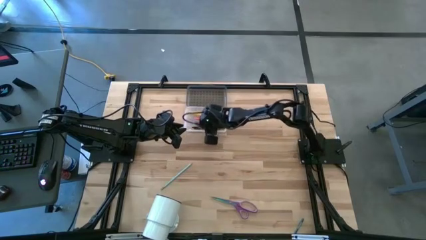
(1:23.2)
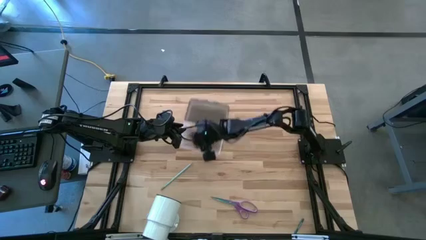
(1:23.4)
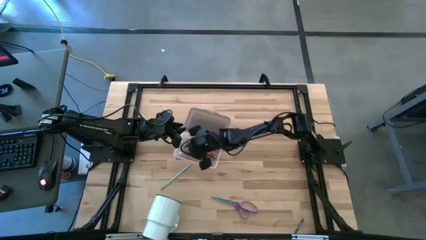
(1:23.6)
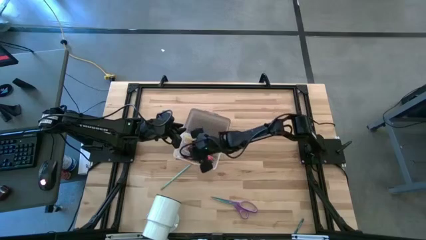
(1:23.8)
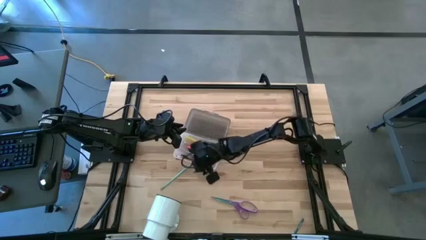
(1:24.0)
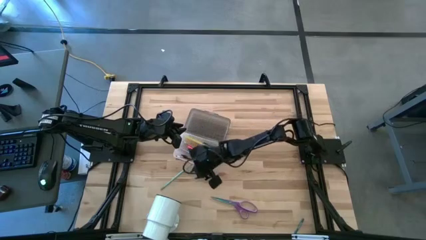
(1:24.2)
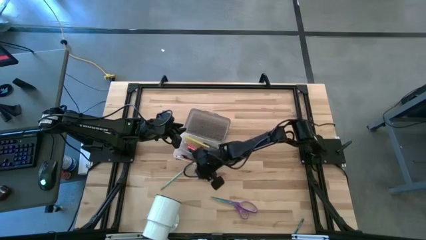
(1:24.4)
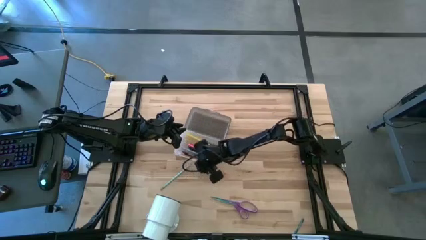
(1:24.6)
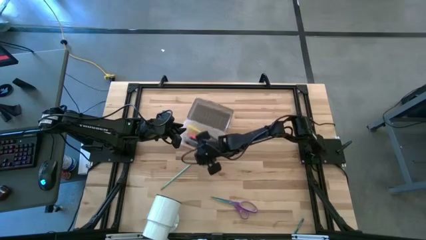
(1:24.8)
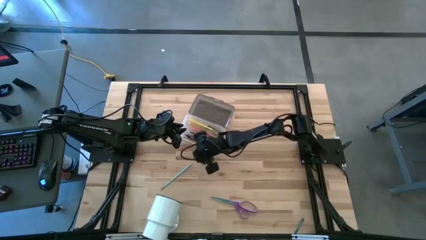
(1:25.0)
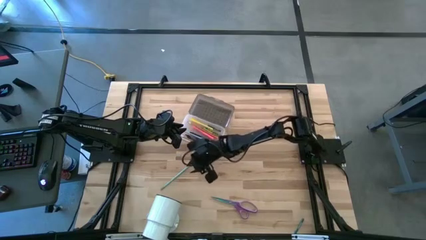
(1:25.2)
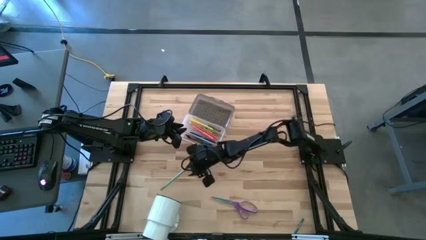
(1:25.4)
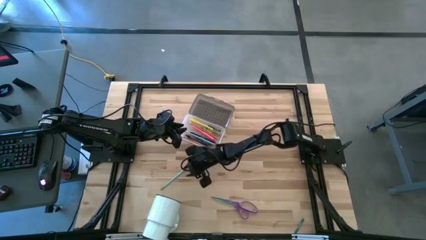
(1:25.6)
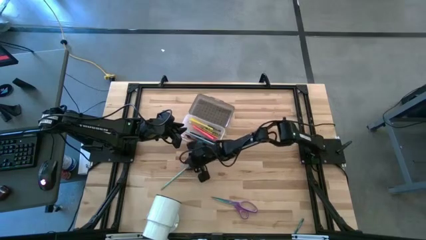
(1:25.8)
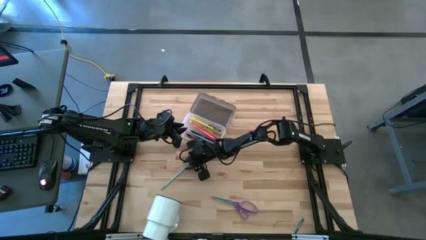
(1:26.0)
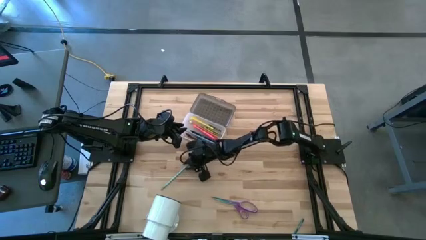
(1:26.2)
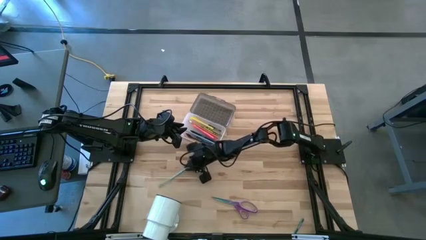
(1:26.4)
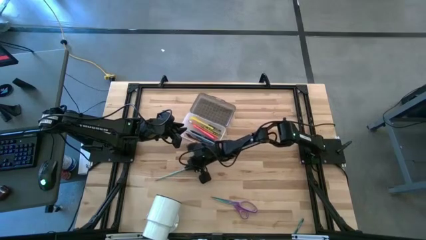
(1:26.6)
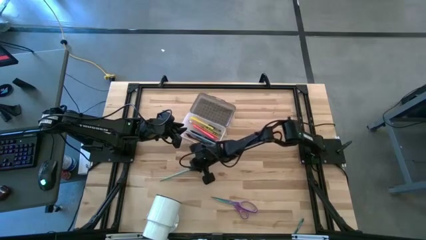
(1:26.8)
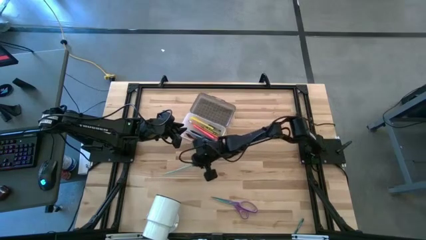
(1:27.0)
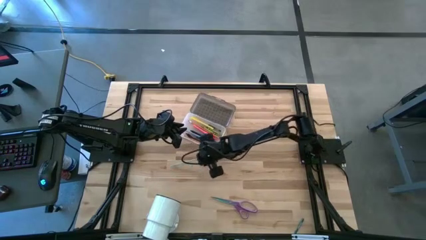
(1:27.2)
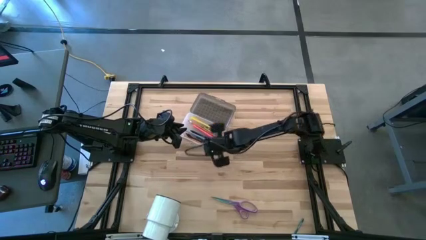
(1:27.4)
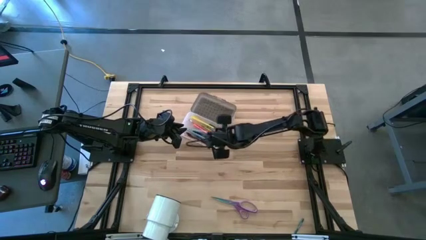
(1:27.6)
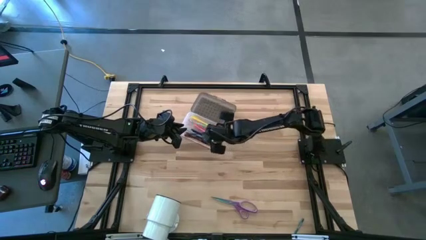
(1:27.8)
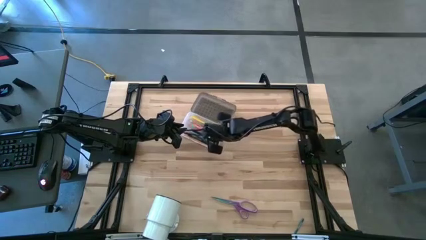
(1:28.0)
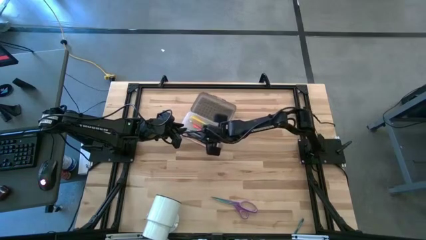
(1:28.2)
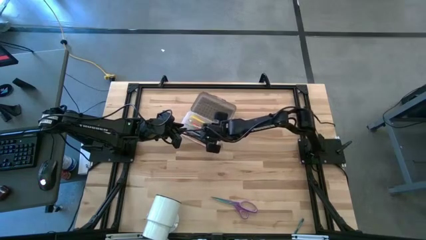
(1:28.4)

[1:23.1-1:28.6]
Task: Pick & place school supplies into a supply box
Put the blue pencil into the supply box

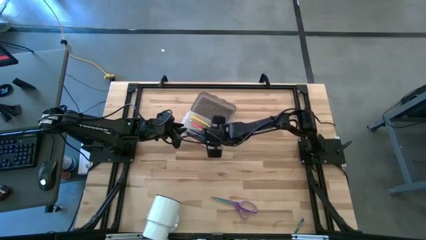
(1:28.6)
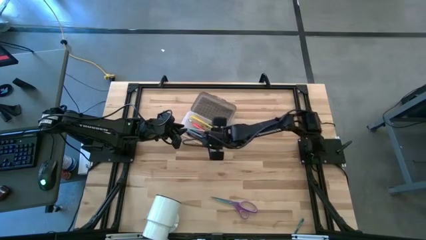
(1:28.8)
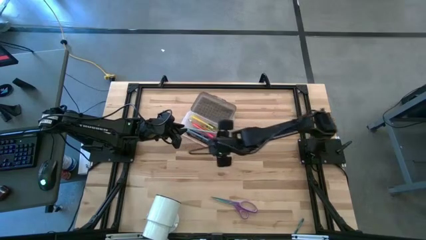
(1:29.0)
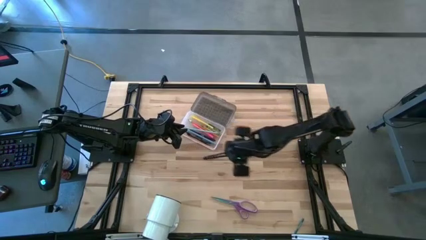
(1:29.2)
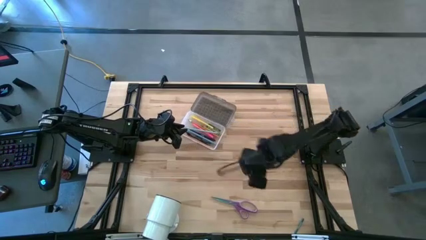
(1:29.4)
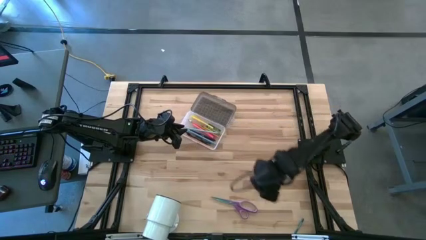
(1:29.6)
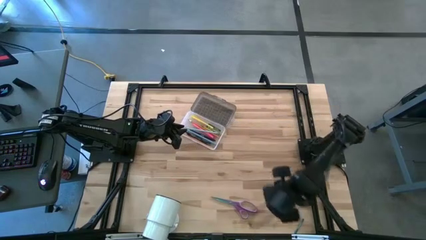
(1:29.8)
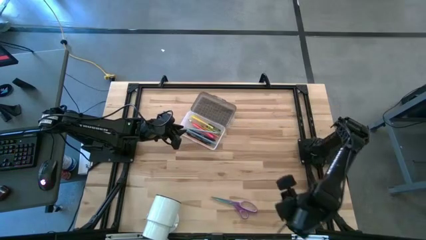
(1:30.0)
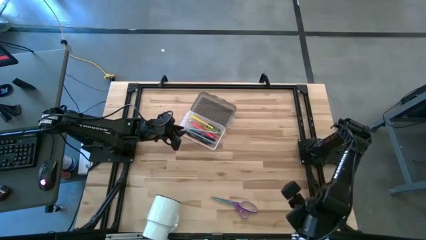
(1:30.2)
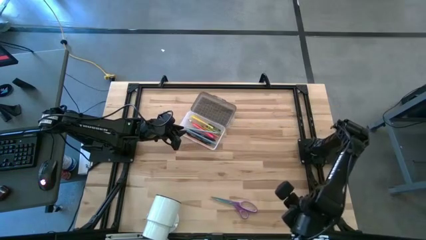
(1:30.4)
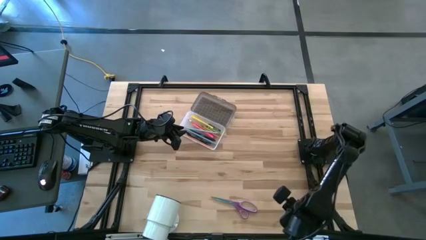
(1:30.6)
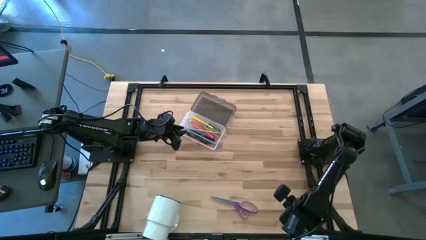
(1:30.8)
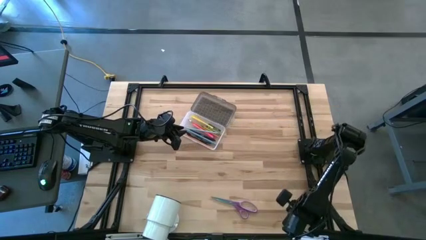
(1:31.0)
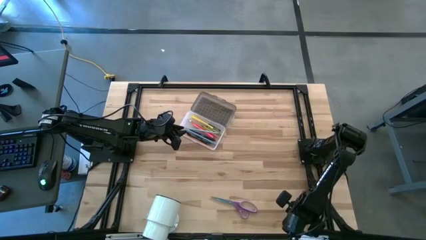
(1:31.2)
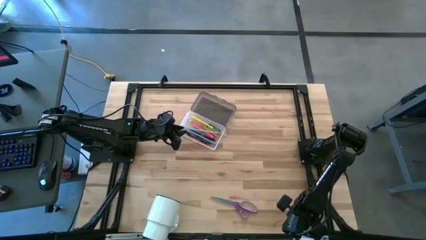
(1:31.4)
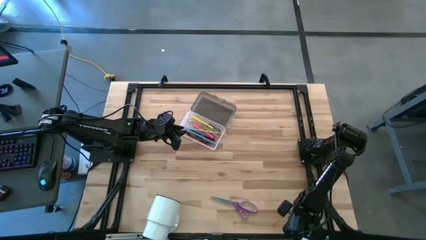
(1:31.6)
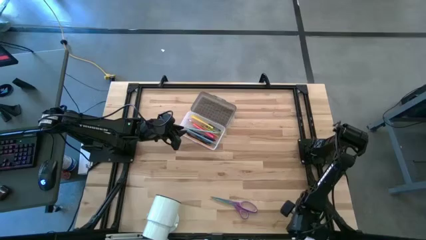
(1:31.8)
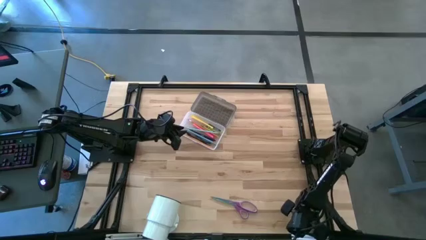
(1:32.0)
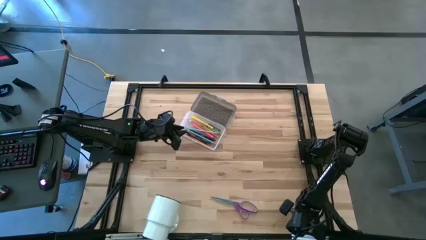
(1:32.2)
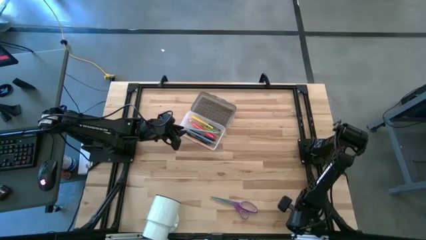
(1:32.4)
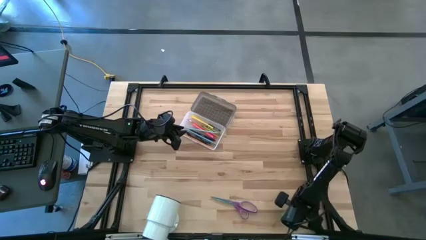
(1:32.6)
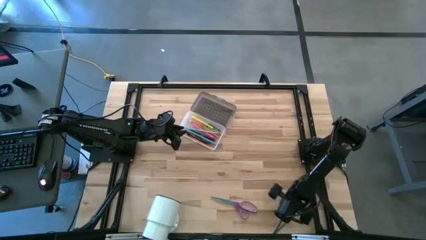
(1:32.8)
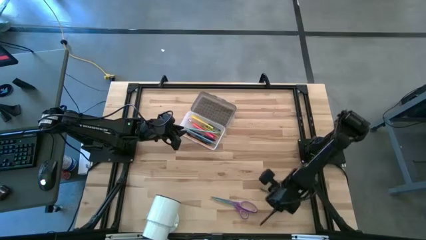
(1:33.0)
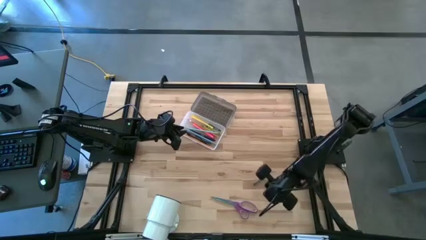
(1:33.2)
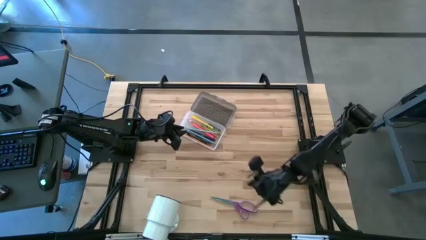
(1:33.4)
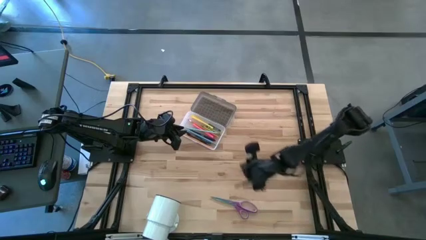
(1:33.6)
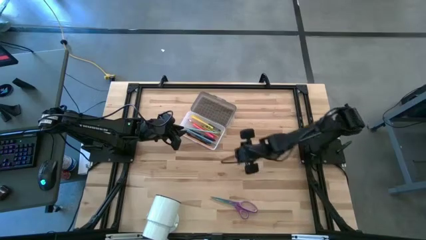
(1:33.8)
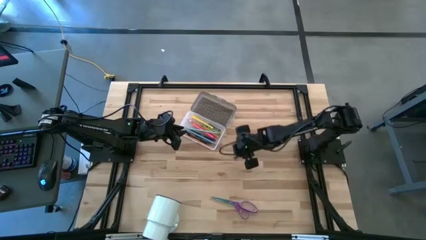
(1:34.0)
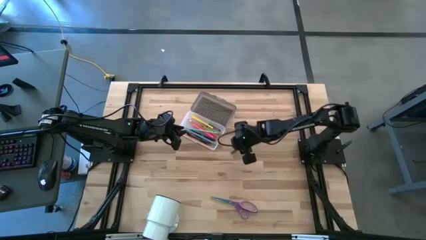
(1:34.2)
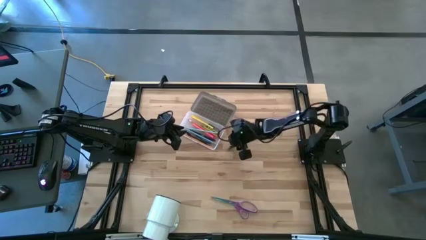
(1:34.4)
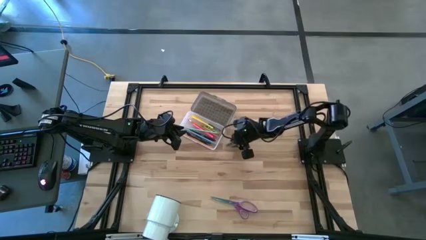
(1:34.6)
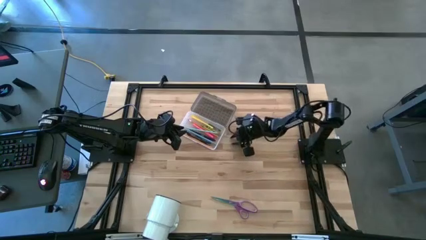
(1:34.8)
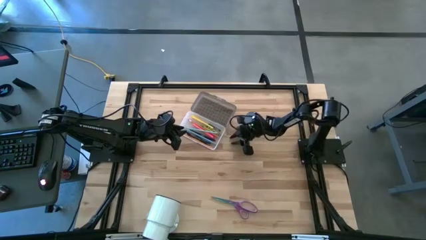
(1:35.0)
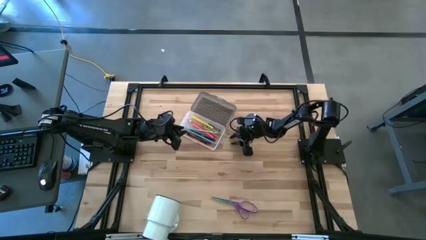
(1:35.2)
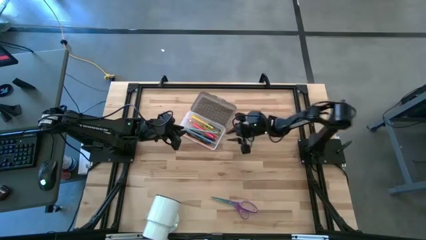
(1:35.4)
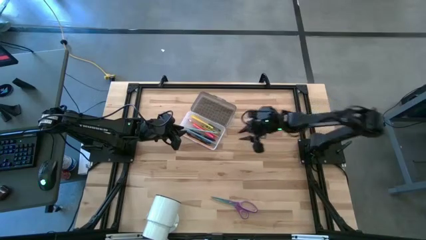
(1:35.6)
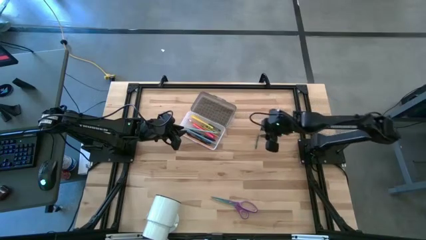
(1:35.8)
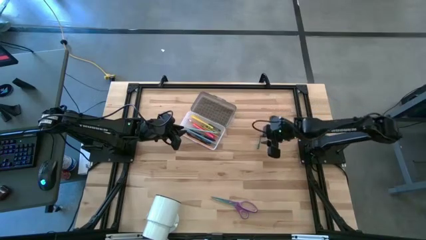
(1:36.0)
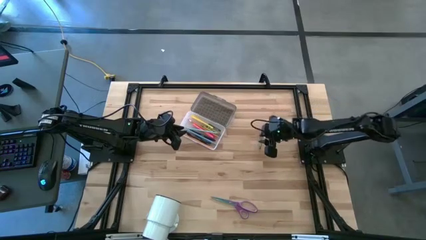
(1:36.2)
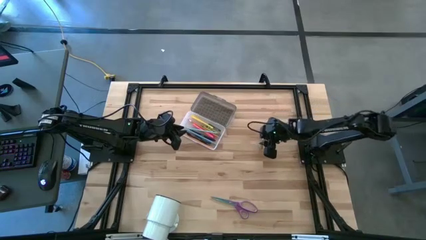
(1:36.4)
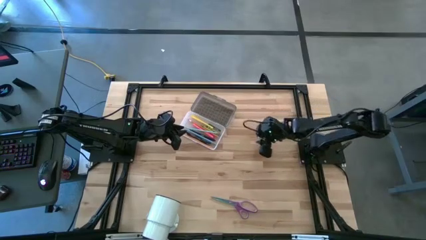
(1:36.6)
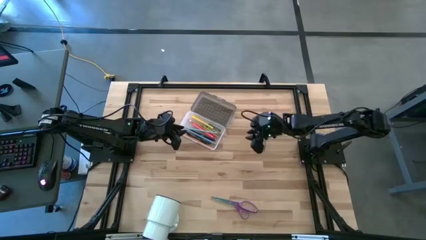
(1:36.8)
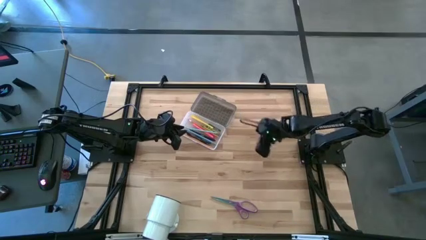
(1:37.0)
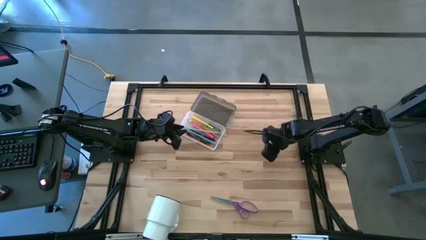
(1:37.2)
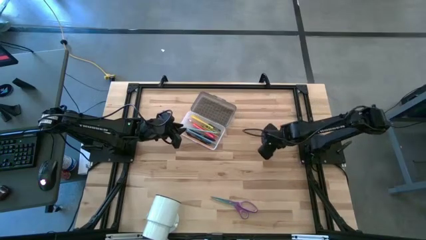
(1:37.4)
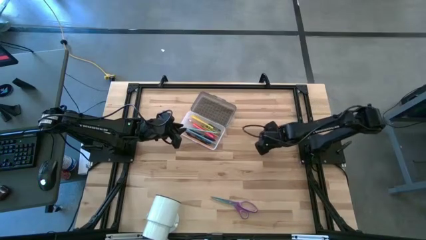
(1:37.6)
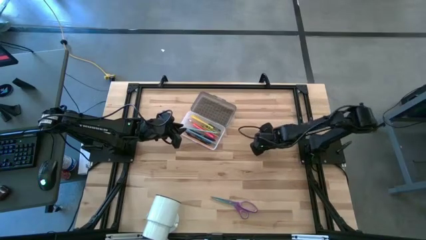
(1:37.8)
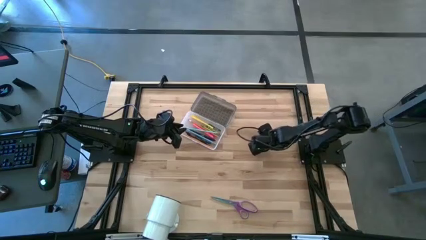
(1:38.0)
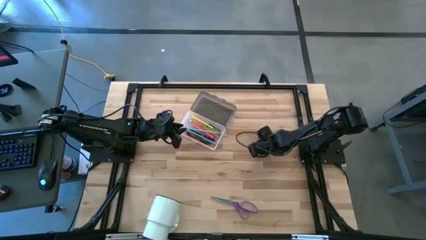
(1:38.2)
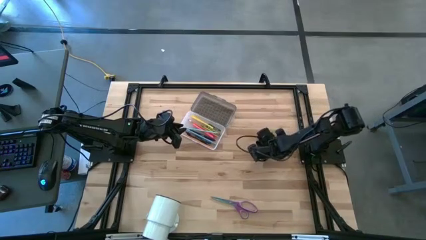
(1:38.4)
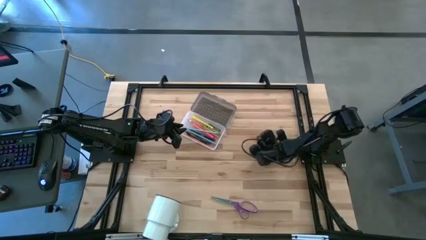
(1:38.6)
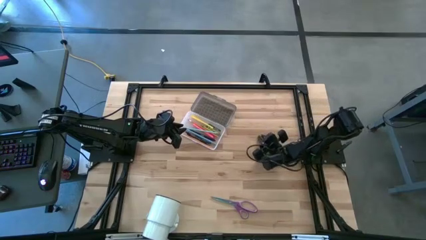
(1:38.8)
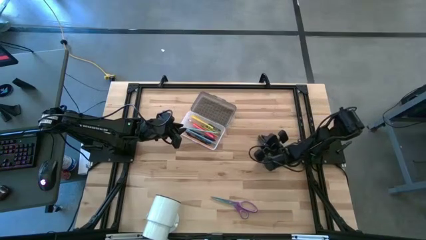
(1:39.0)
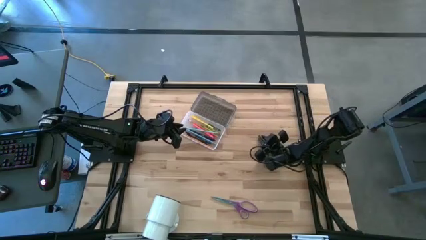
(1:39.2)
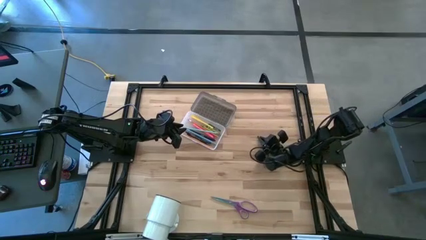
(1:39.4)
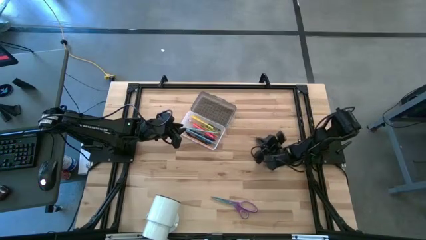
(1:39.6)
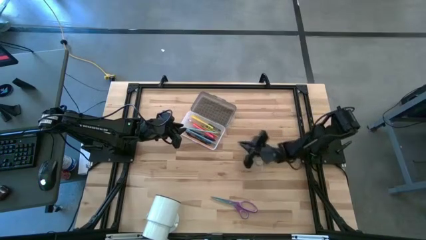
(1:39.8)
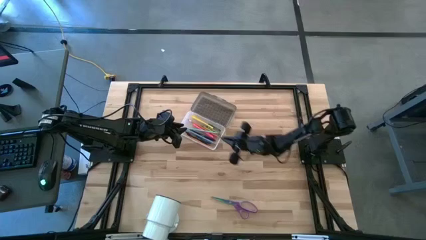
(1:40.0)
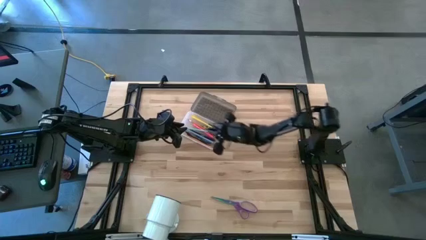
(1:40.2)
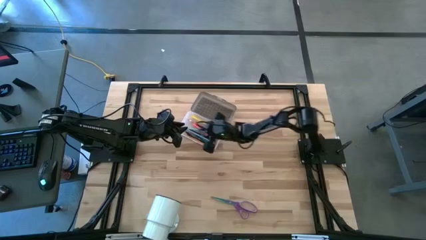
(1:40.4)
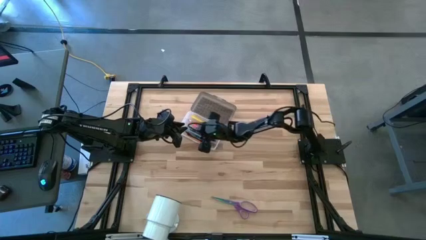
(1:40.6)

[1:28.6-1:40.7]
Put the dark green crayon into the supply box
